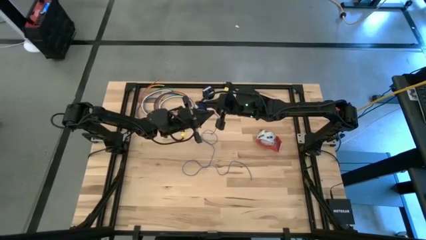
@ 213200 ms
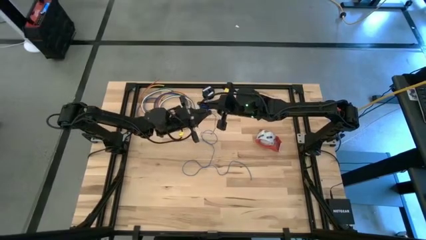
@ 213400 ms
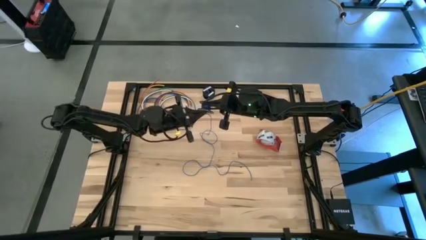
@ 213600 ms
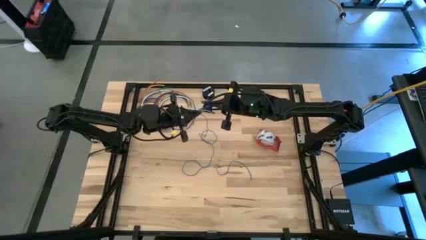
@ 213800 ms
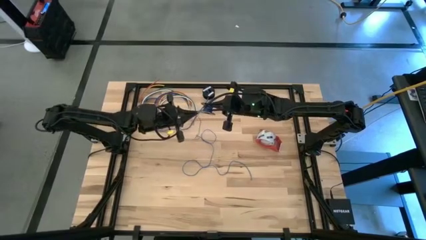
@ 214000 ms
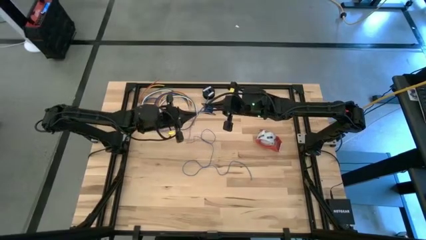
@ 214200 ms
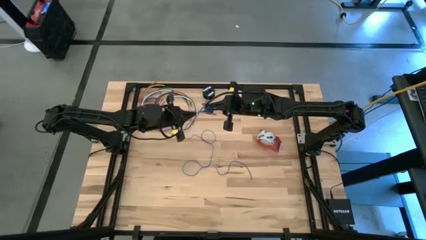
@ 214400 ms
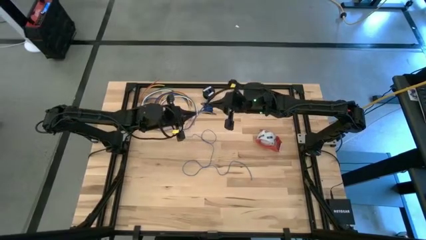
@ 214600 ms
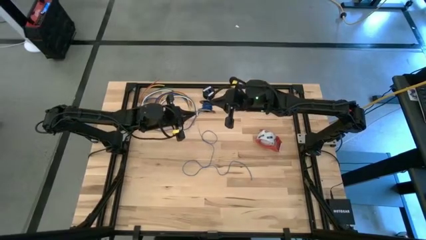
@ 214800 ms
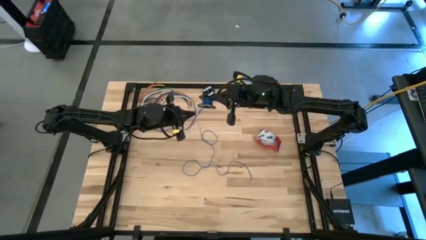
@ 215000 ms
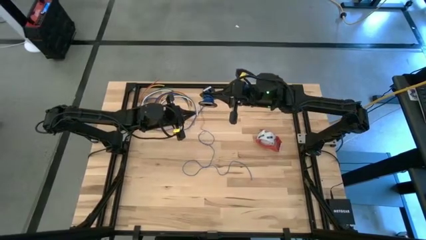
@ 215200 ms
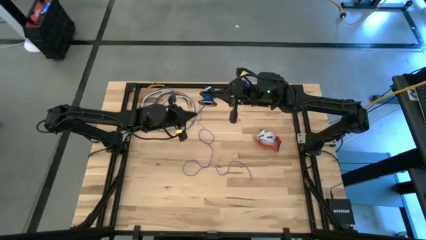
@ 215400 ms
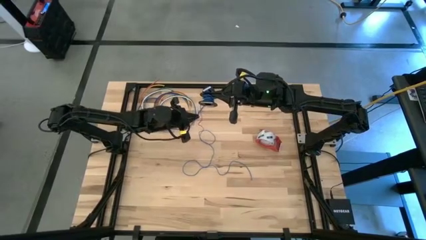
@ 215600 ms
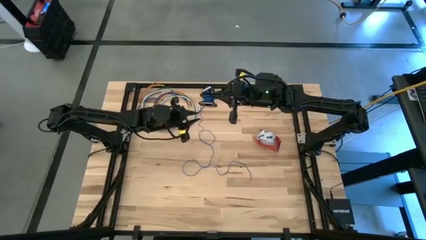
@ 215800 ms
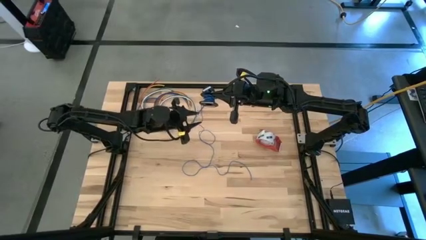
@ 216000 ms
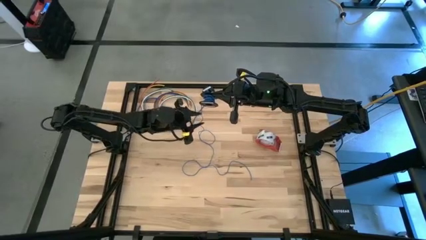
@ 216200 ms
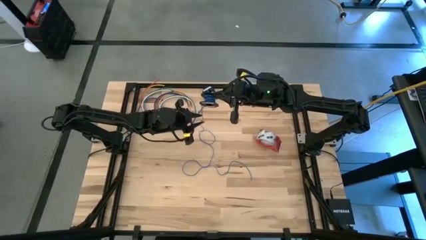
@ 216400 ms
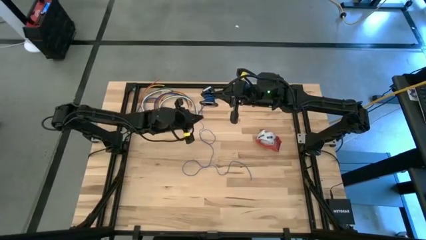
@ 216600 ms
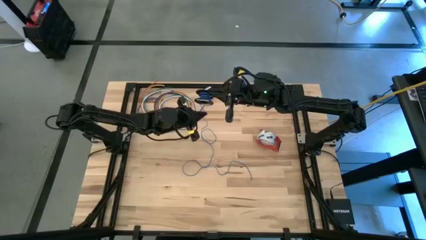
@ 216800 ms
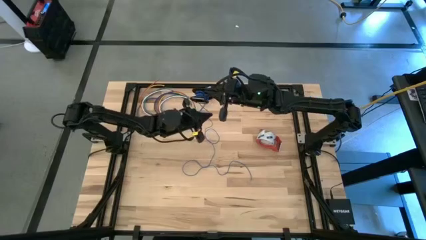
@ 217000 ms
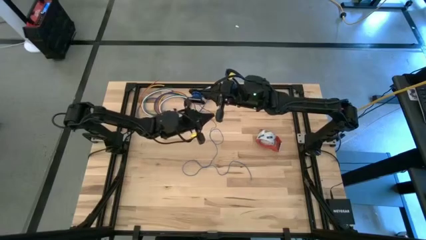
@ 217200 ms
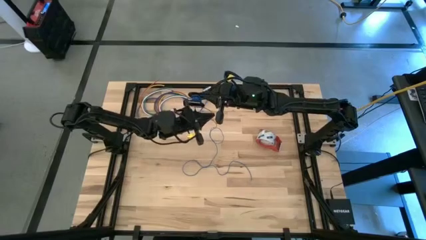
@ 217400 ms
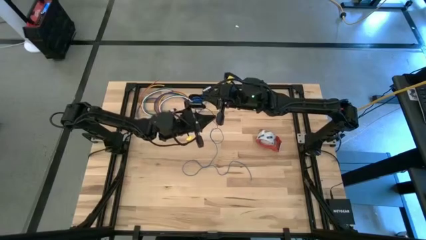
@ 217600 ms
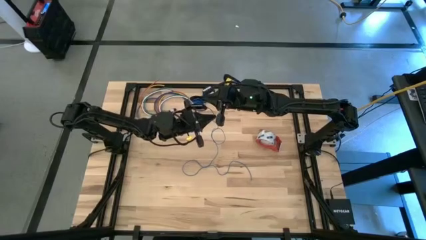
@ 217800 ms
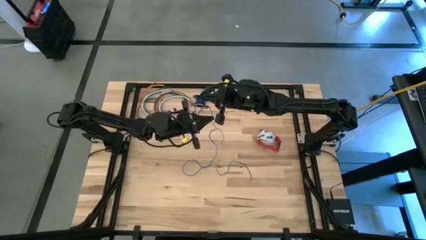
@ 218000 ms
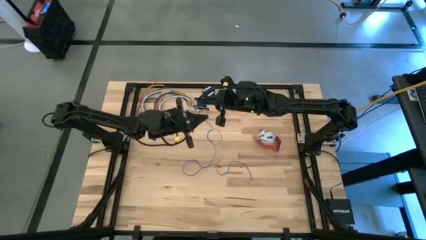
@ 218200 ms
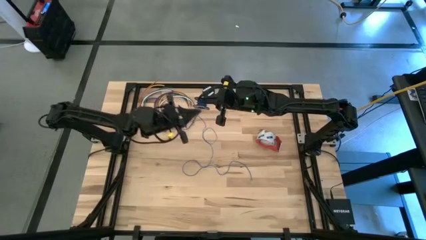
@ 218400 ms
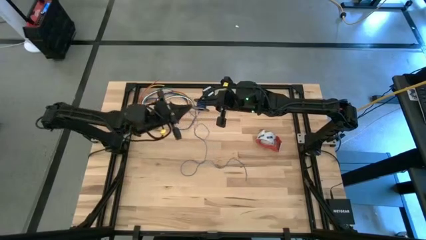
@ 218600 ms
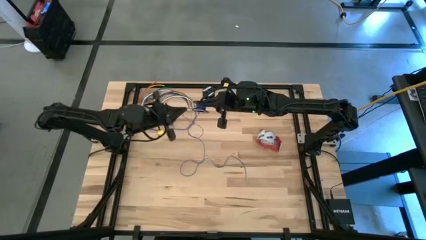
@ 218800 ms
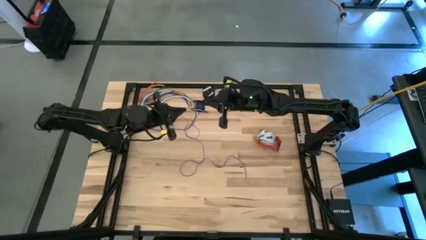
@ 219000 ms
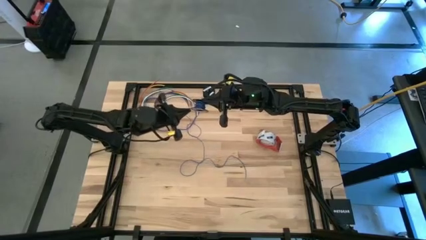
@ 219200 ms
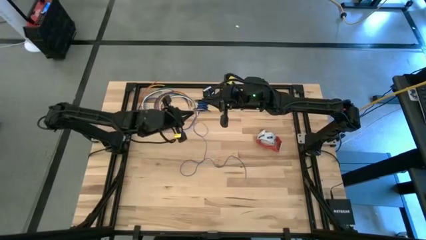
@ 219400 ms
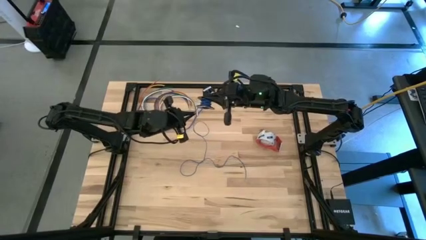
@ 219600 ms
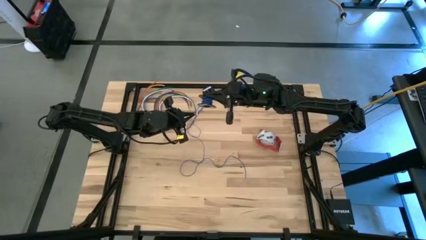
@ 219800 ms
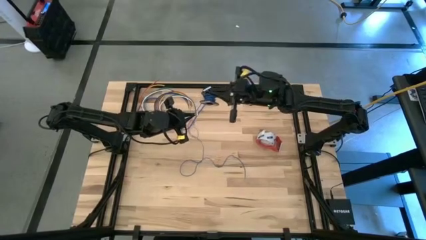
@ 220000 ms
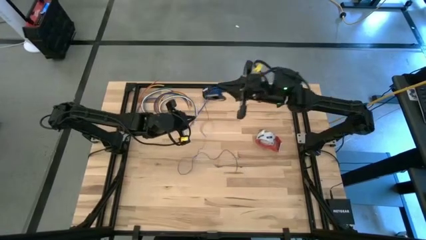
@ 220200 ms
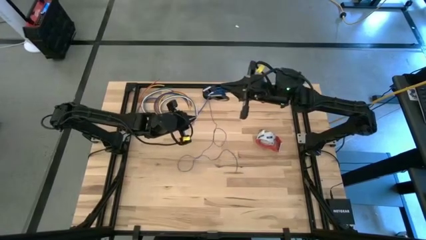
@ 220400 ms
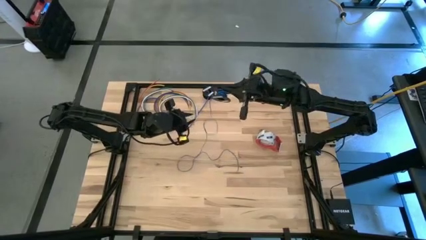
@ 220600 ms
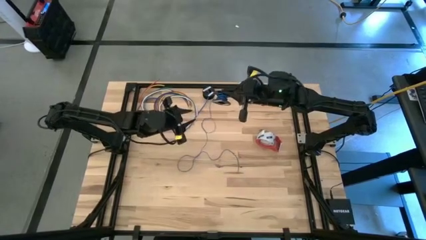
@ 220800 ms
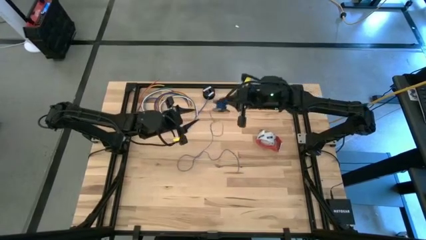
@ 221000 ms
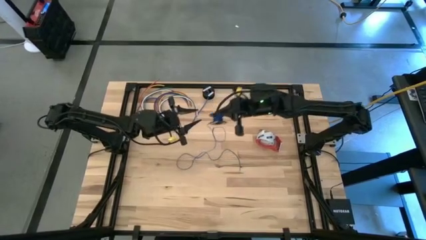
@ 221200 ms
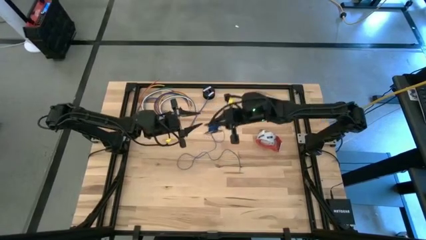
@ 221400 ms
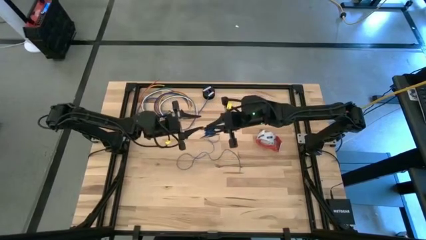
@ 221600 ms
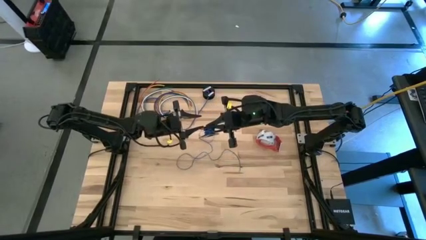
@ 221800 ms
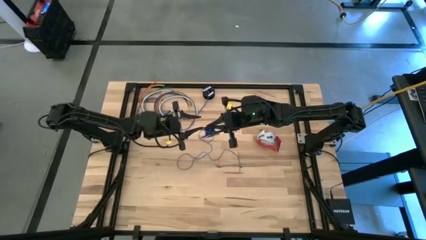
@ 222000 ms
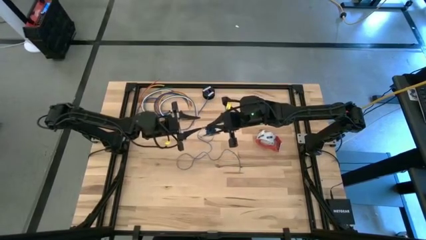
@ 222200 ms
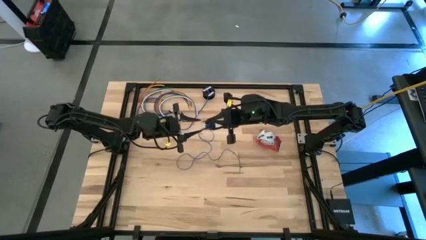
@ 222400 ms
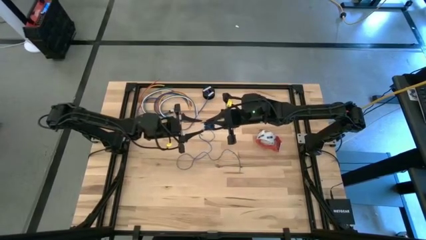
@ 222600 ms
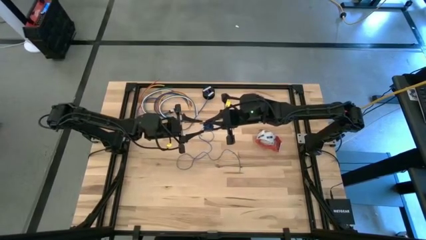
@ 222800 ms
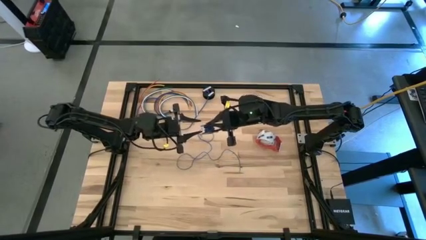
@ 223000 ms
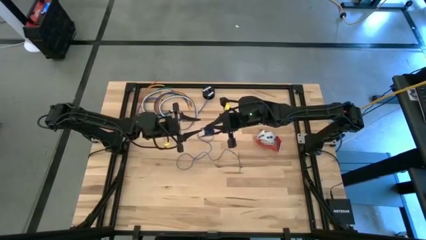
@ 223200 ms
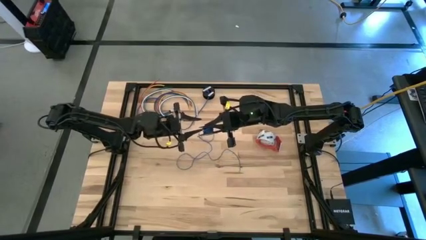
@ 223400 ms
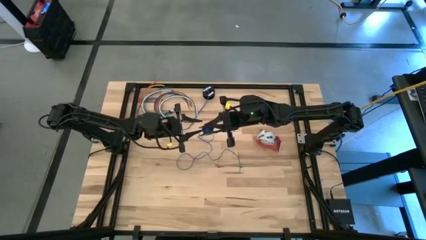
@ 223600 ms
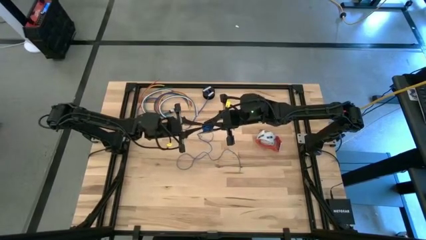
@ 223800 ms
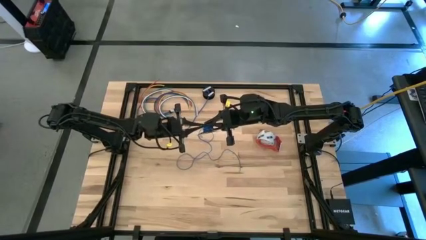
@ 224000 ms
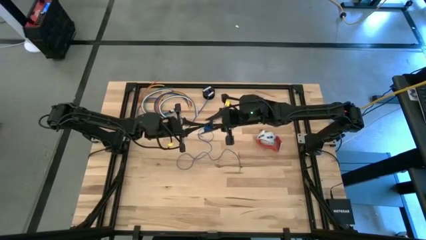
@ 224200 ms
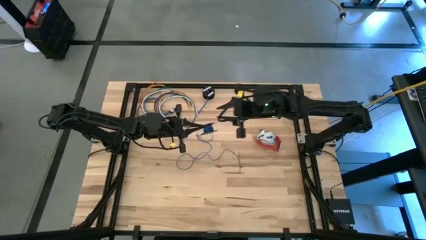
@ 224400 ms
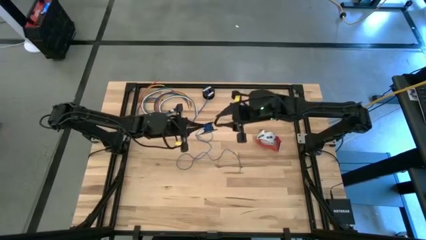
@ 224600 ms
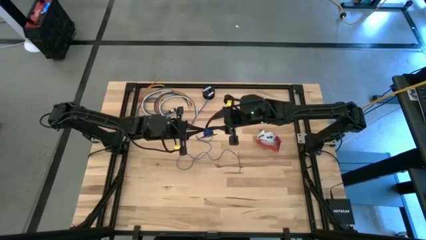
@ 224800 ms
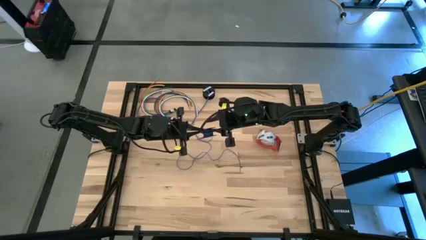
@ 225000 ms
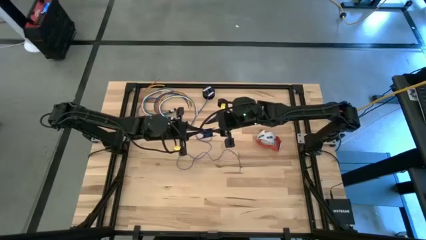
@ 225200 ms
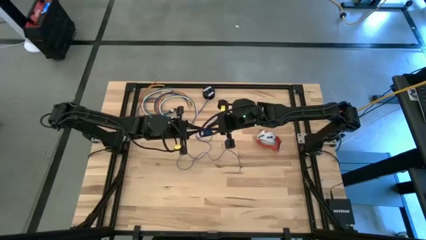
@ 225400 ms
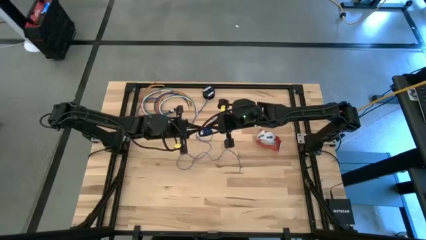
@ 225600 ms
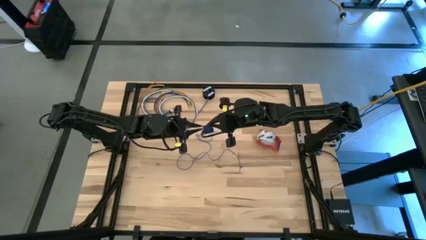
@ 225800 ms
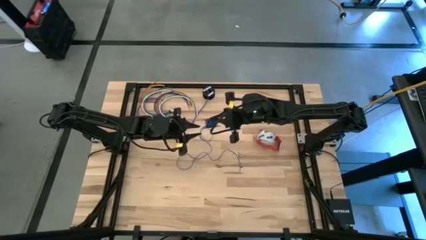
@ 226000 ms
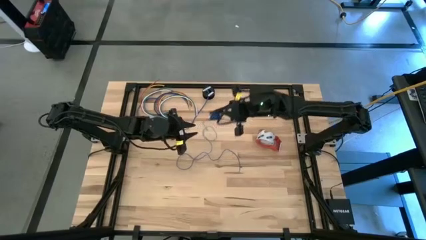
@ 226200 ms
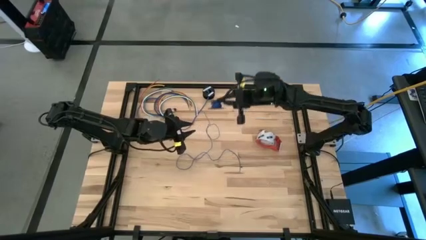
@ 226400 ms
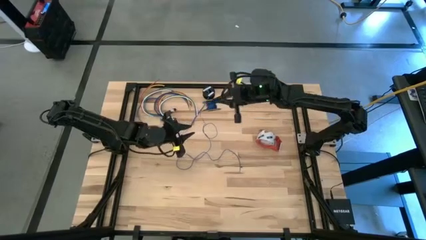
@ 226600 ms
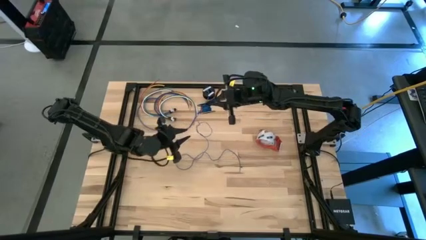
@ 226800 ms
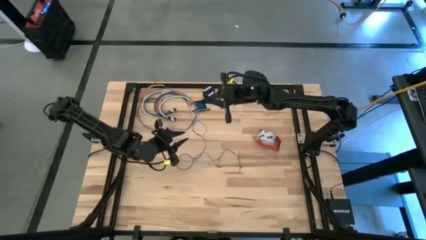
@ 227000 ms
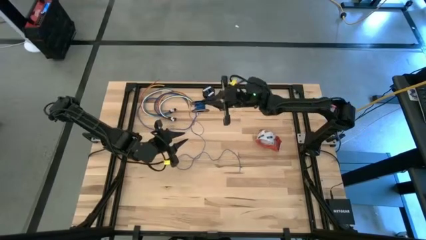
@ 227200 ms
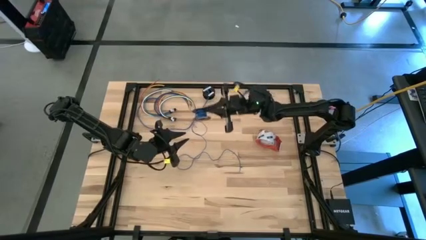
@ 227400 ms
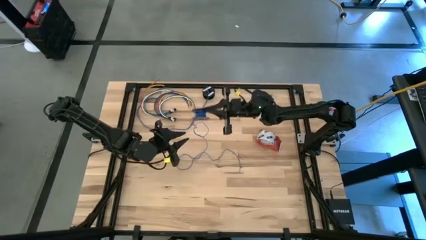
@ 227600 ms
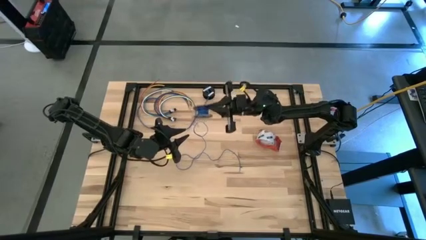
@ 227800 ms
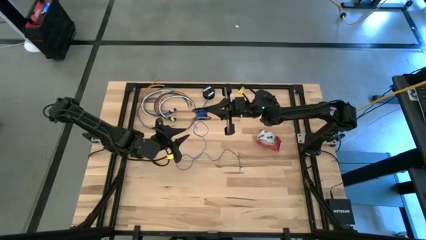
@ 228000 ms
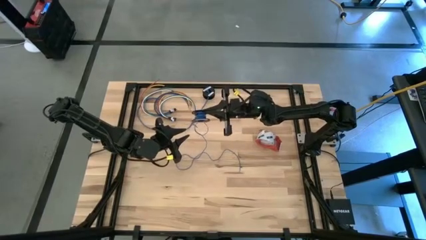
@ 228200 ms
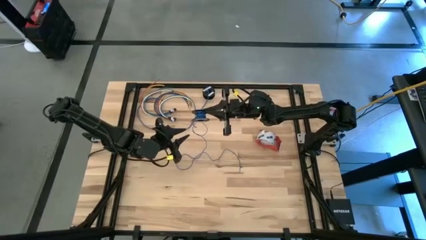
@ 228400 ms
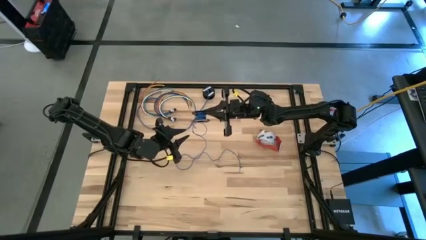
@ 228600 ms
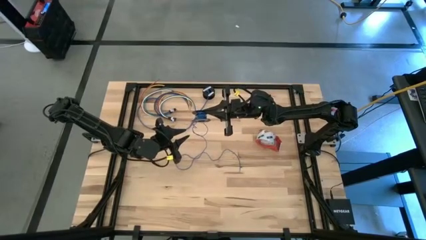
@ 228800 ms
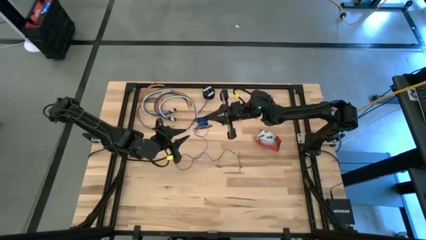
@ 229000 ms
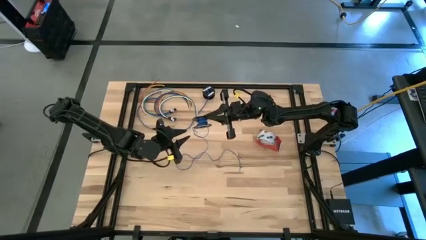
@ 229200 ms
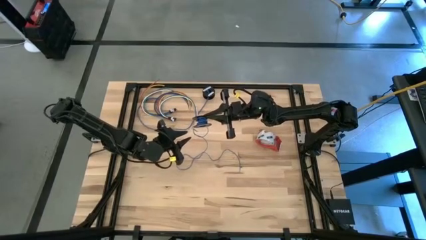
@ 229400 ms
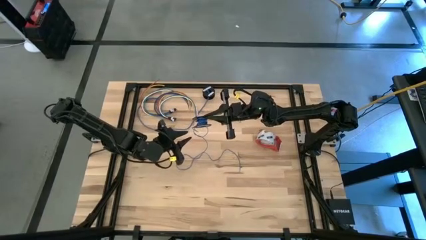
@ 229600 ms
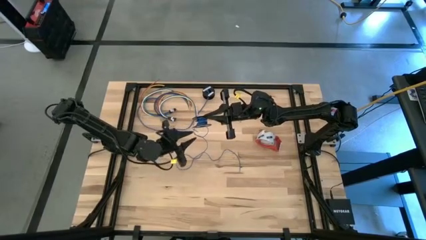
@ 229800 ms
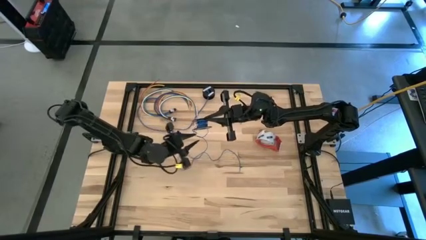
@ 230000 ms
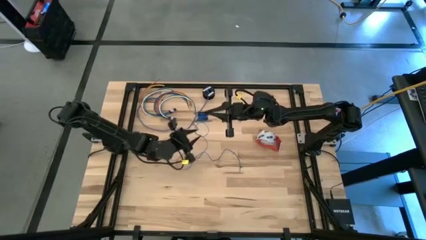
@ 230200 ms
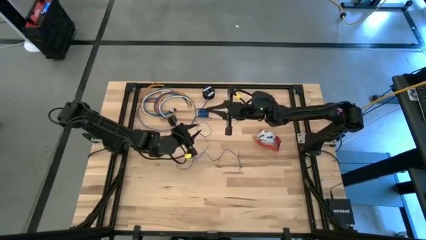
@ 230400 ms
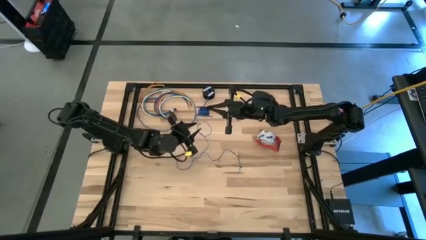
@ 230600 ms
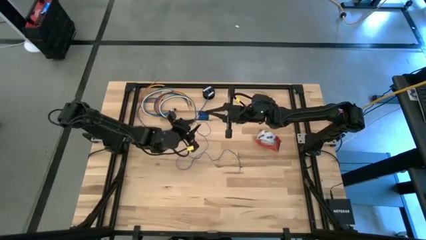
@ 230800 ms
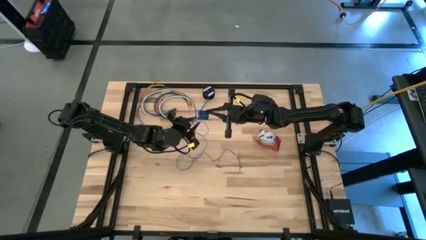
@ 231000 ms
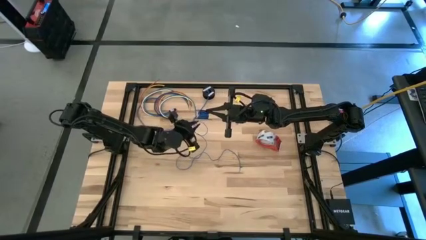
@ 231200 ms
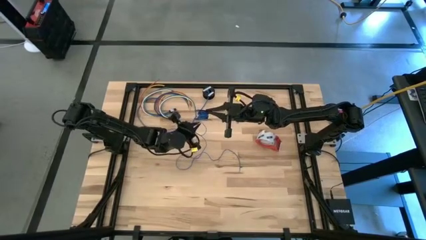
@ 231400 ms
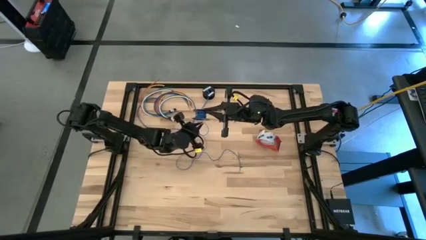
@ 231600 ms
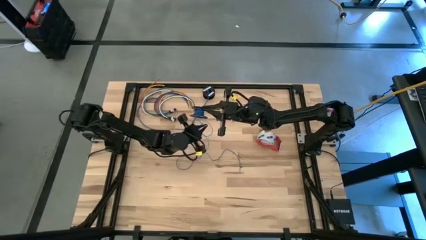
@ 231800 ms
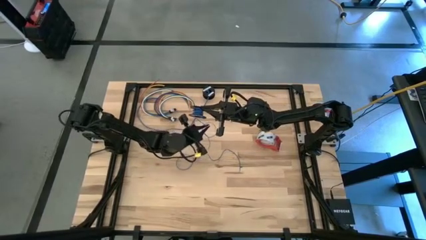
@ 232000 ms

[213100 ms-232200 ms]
Task: Coil cords
Coil the blue wire onto the spool
